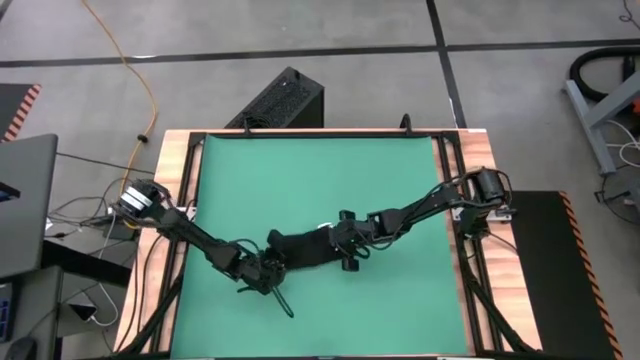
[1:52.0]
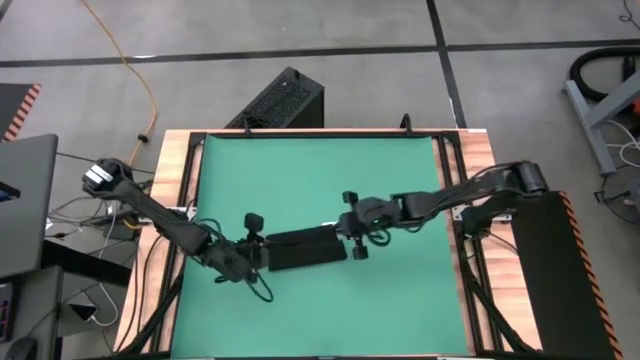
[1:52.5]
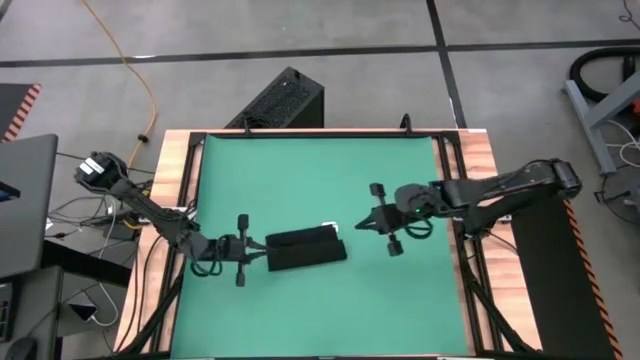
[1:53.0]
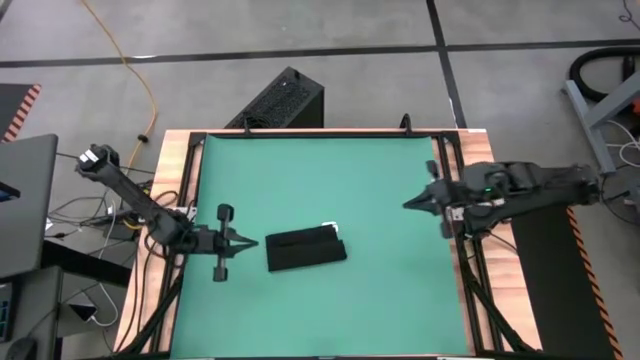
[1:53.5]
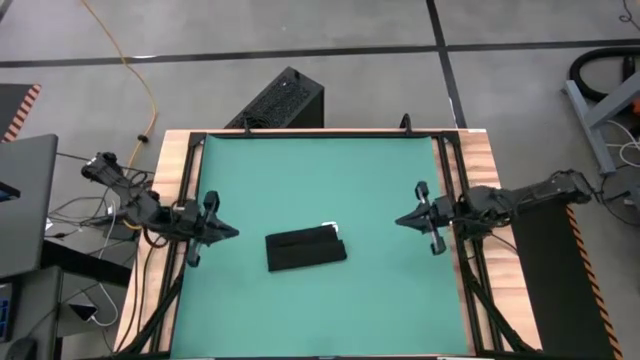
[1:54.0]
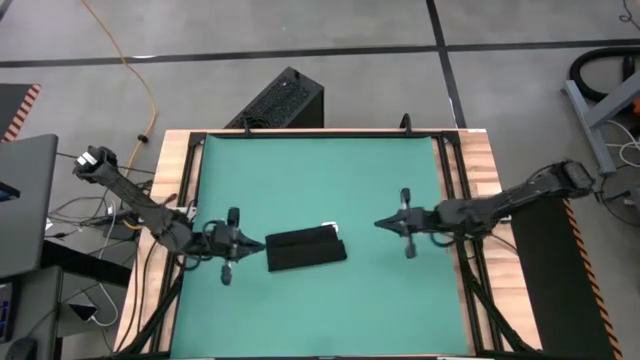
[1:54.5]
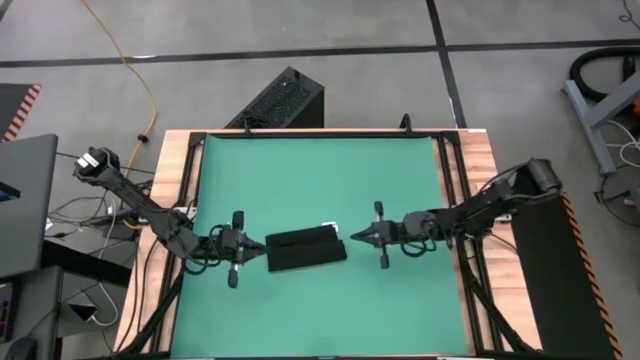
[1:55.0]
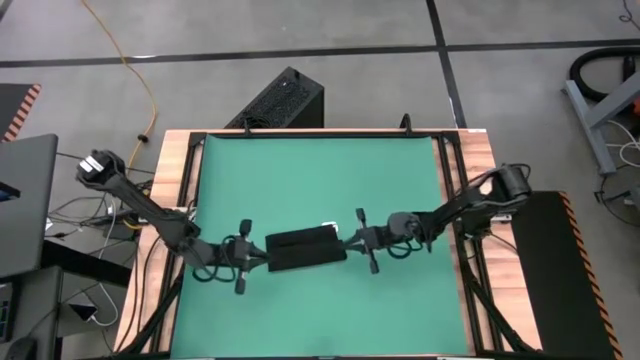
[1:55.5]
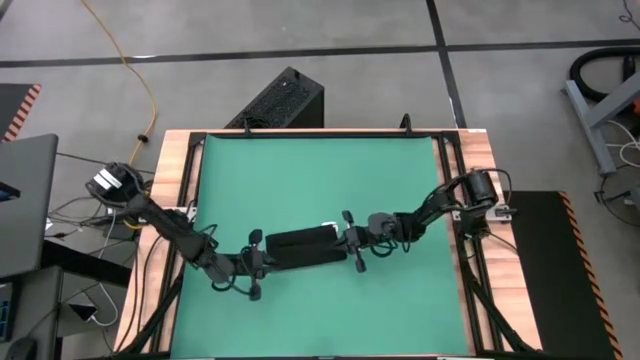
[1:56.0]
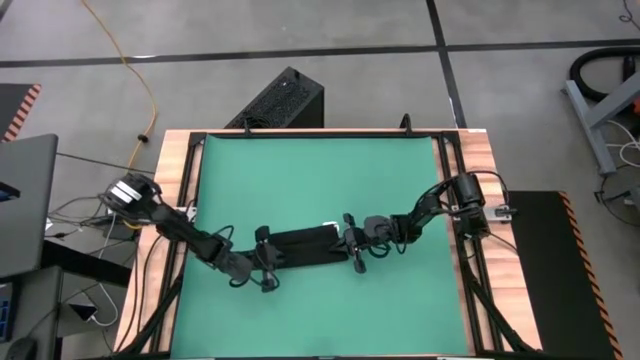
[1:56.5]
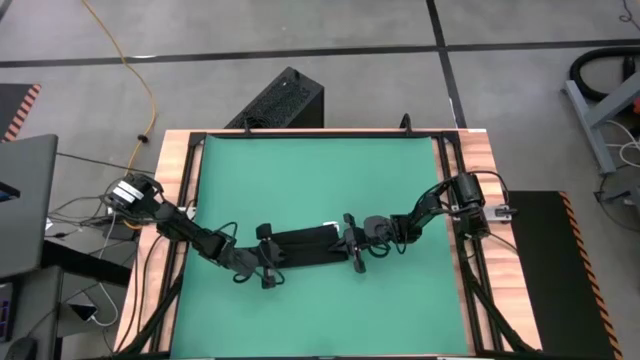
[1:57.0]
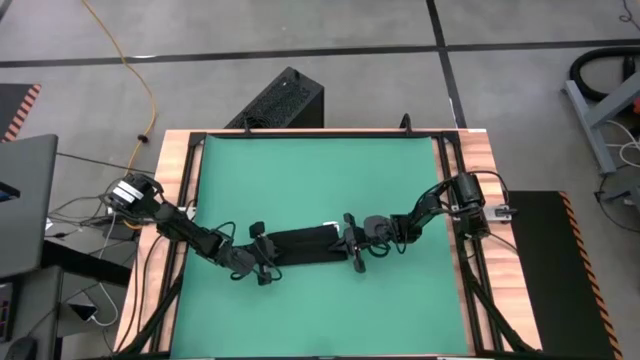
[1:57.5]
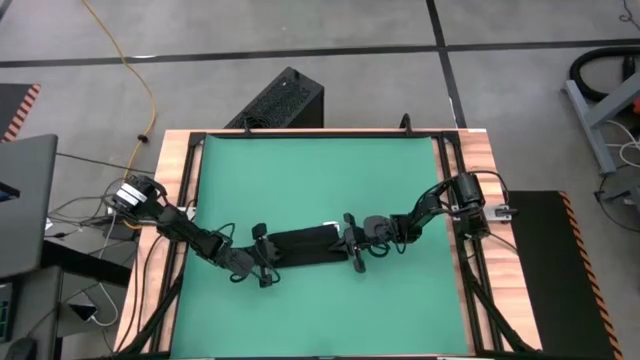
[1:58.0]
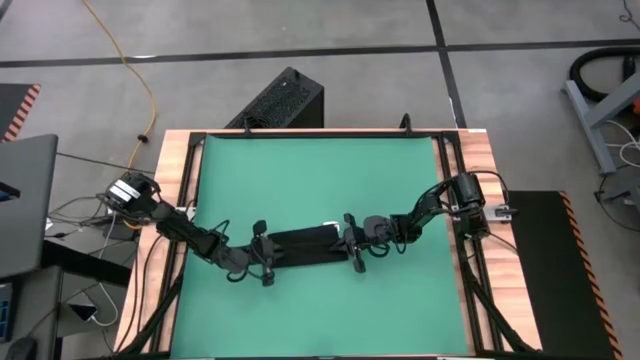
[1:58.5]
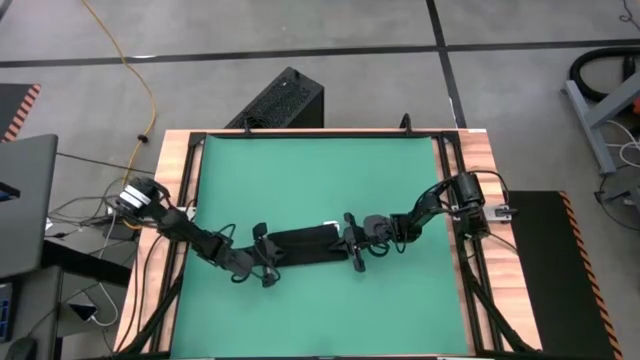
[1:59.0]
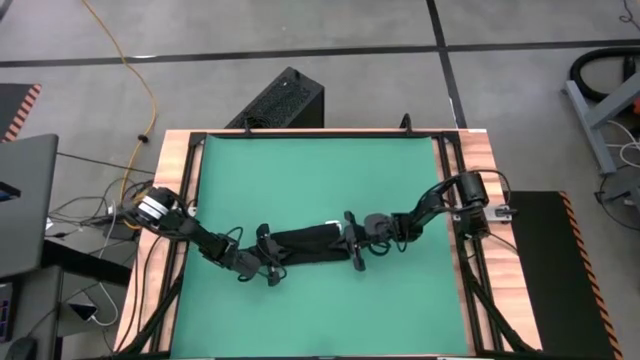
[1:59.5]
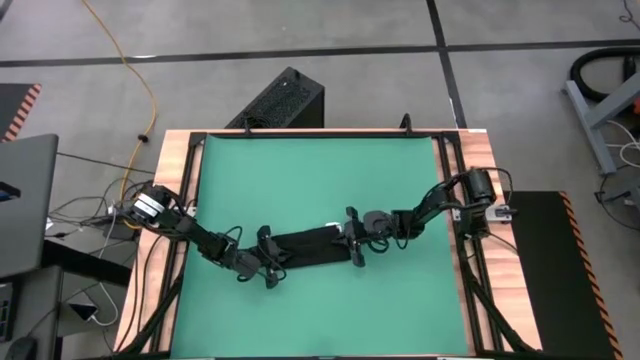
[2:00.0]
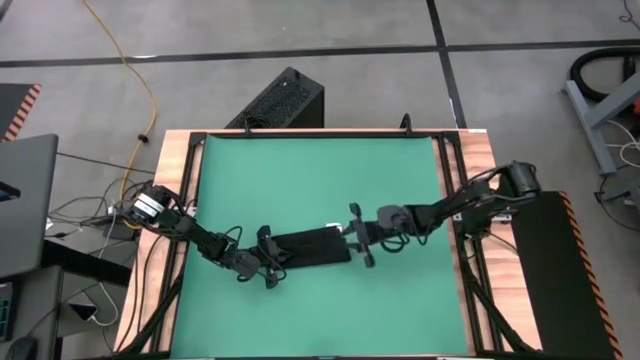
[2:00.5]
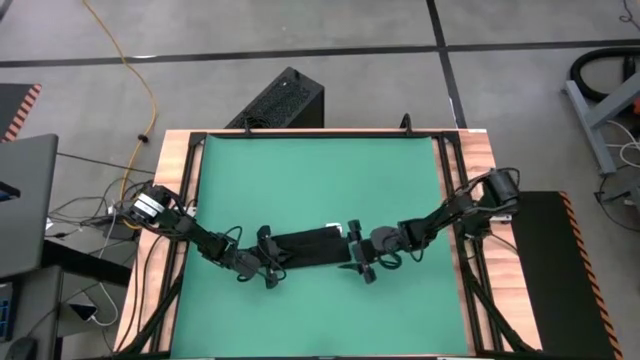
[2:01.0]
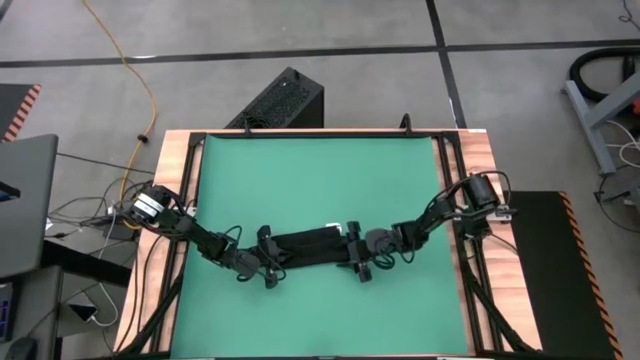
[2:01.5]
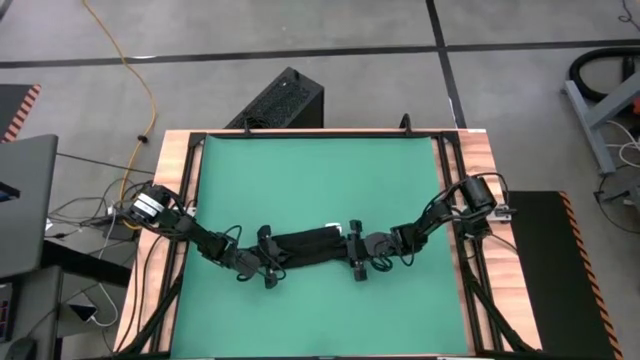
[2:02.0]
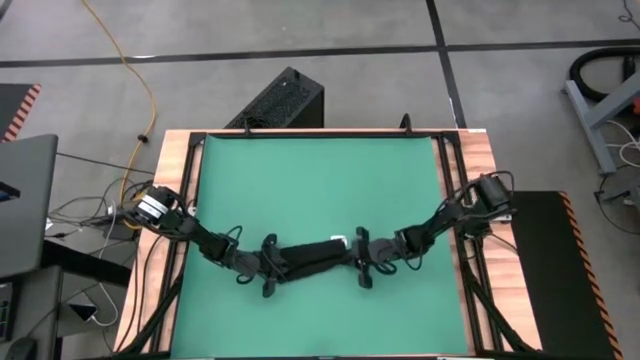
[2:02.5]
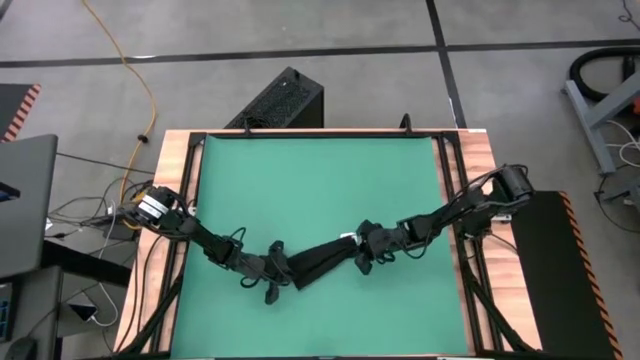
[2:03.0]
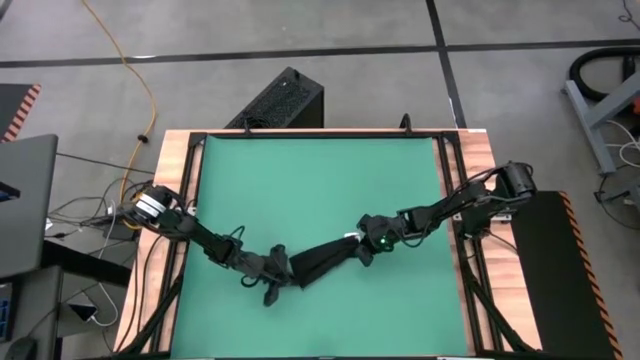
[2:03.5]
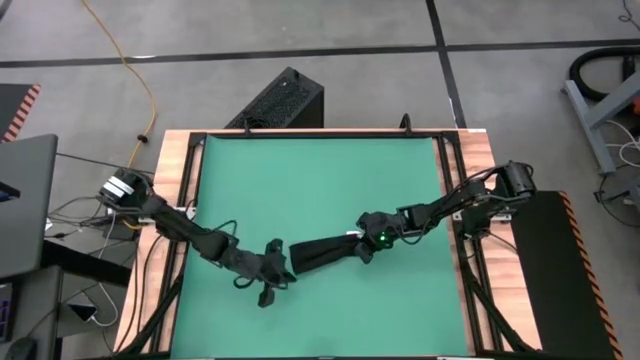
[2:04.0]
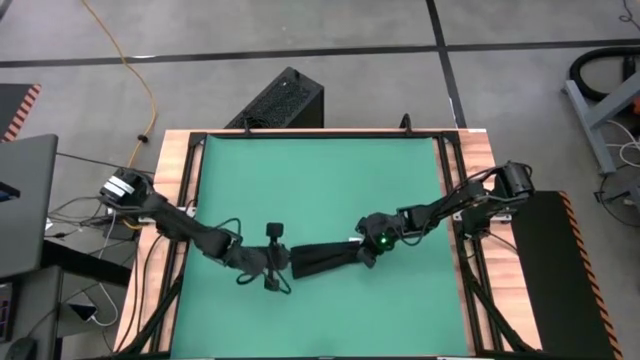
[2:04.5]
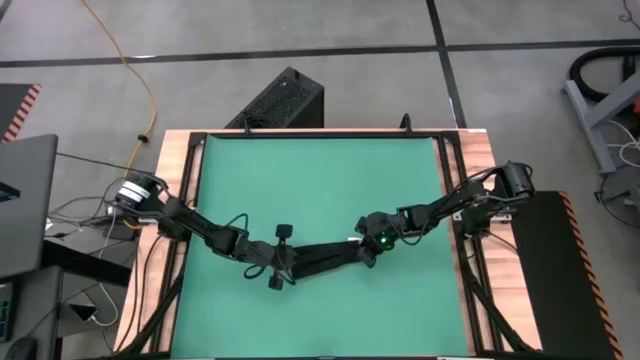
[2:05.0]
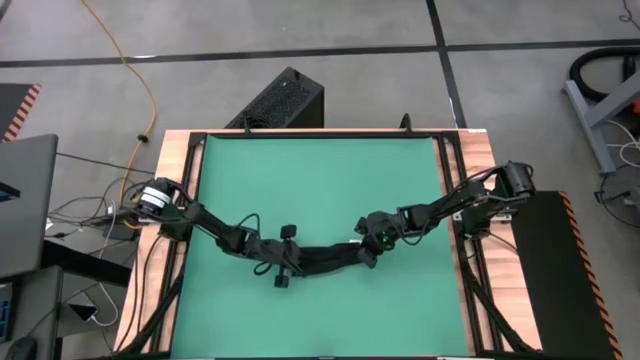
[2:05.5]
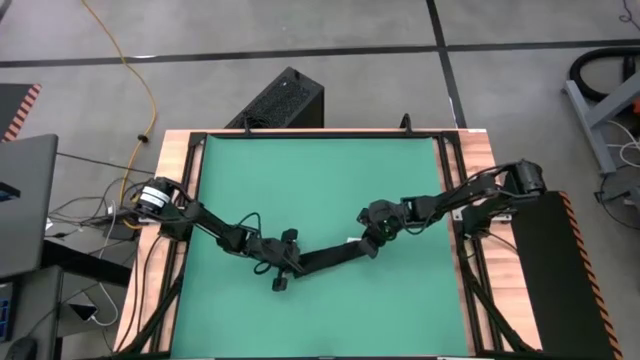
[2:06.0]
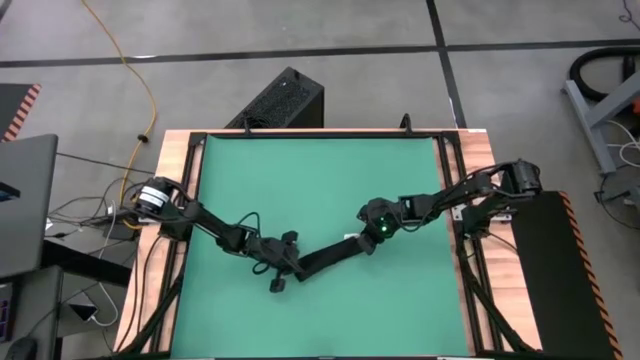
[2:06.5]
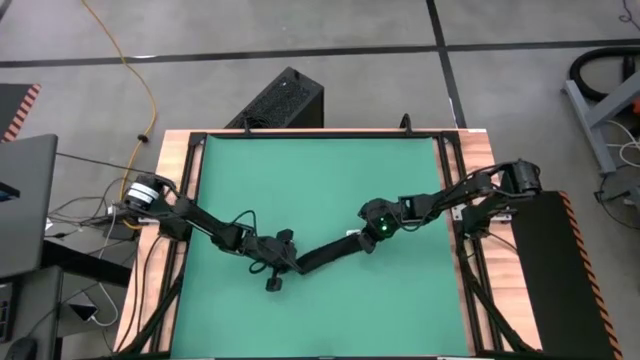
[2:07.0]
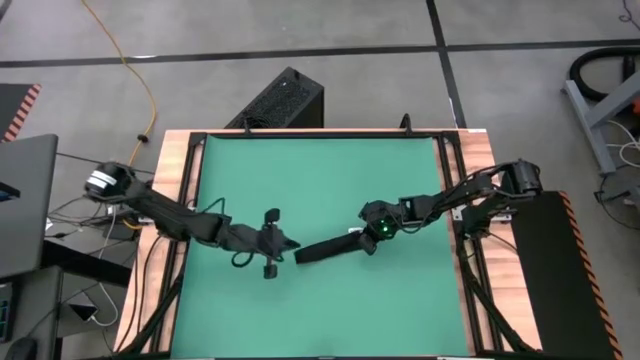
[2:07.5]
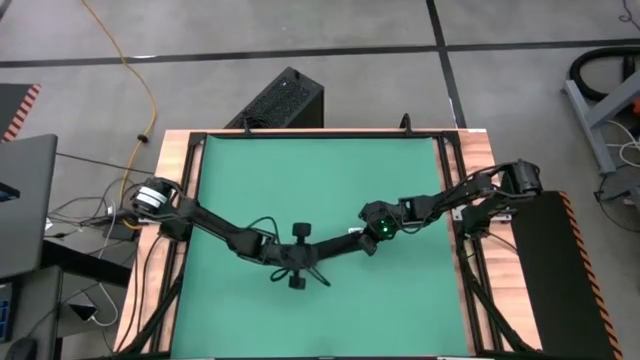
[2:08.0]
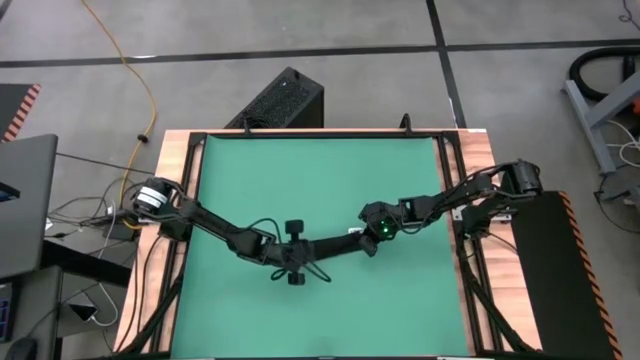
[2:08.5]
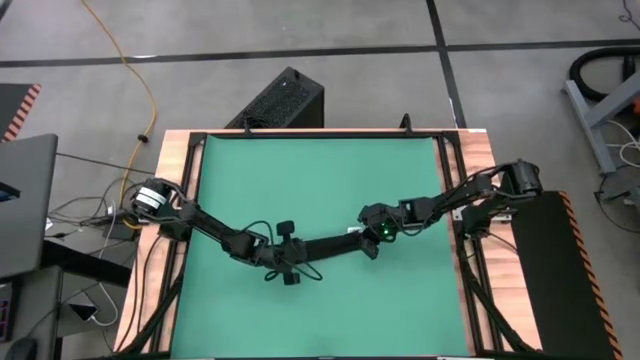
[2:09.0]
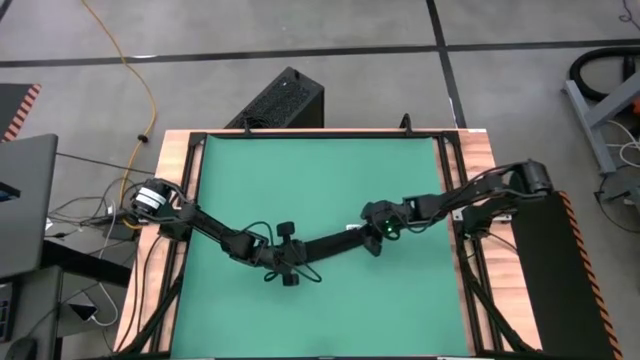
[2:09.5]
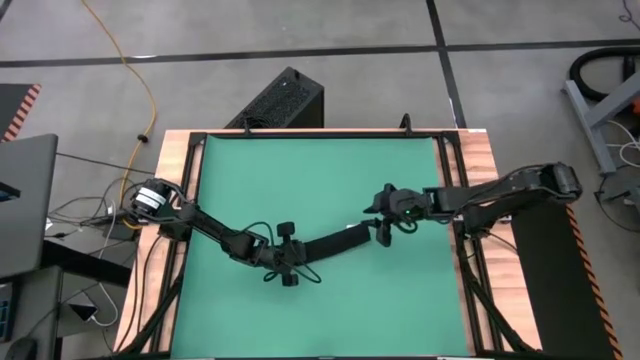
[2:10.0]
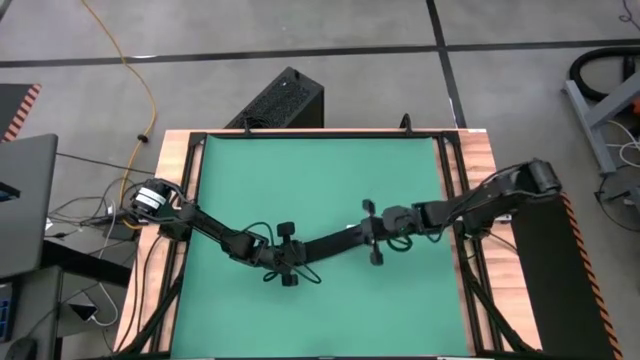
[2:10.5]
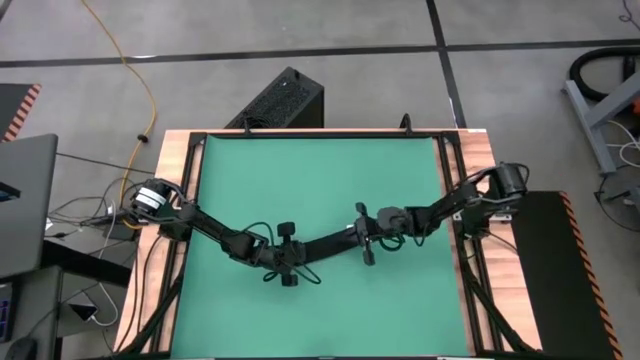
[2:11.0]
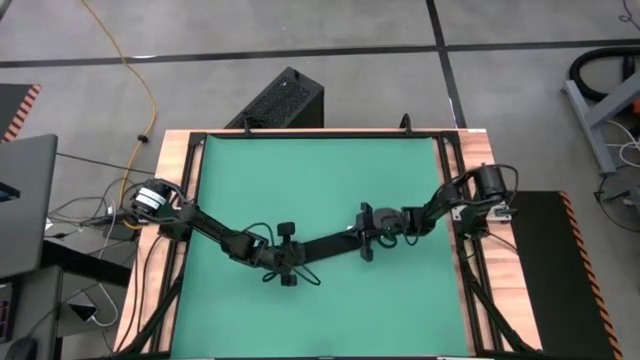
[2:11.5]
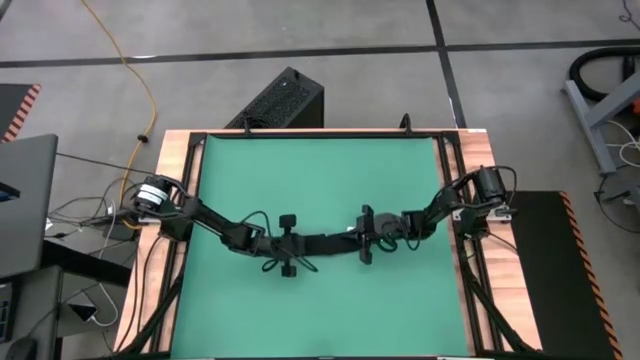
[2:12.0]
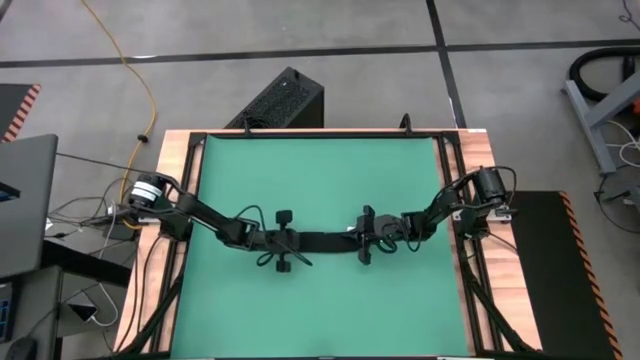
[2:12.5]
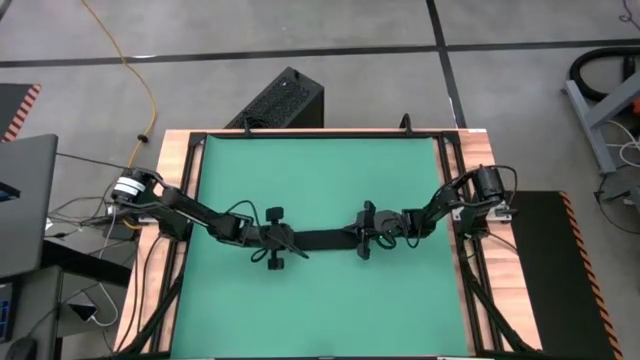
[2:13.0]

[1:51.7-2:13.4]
Task: Roll towel into tight, uniform cylinder
Roll the black towel
